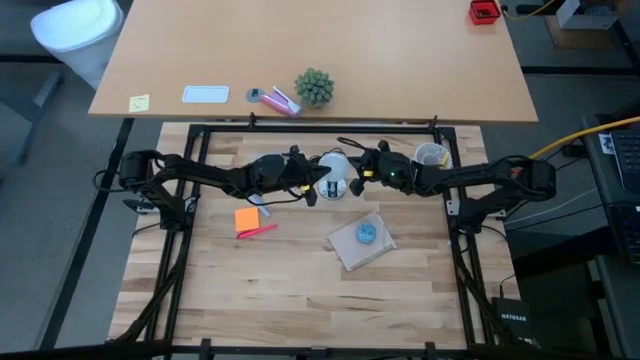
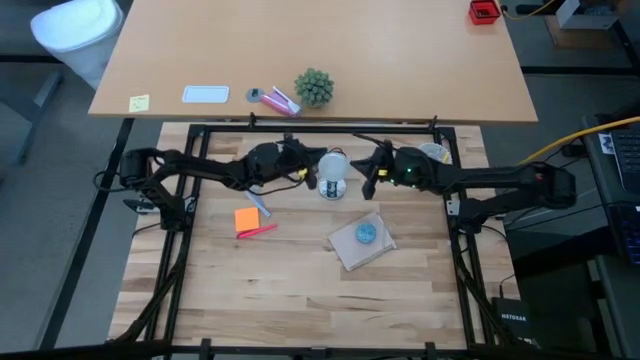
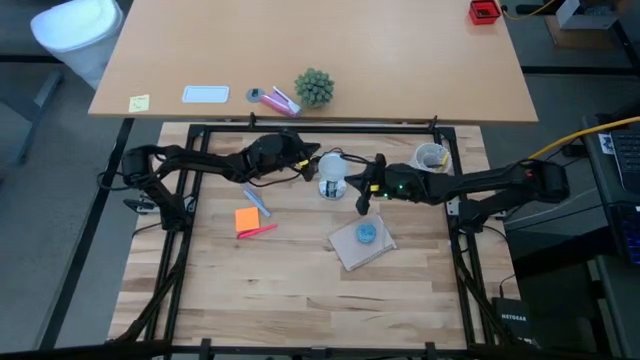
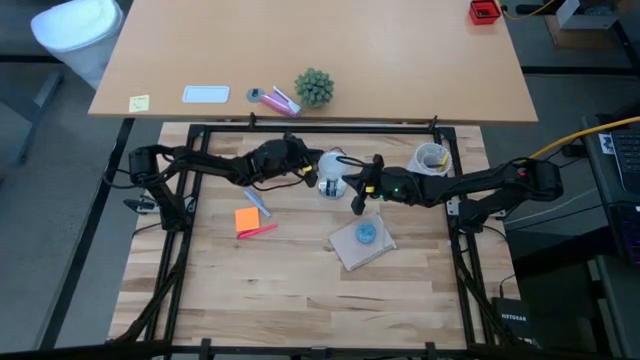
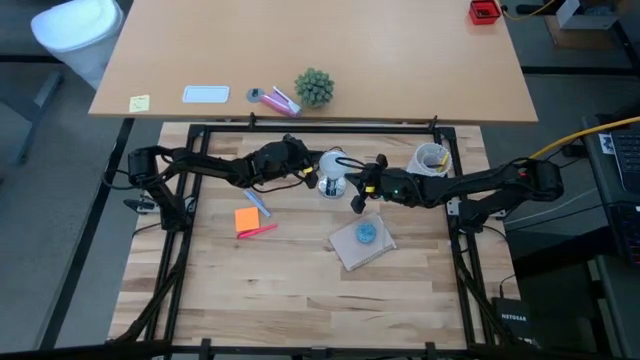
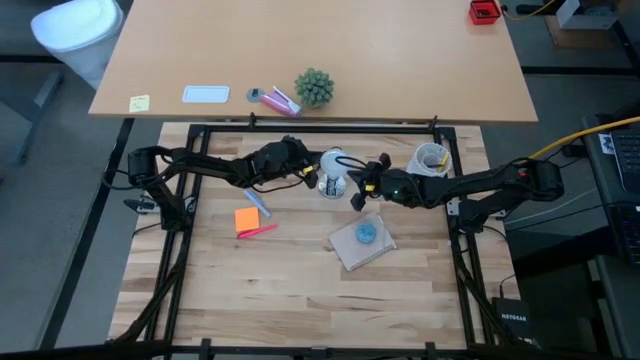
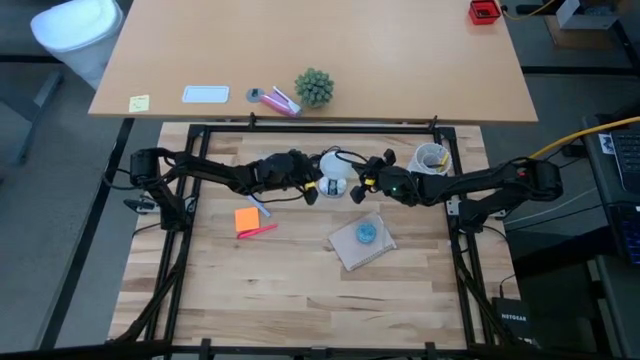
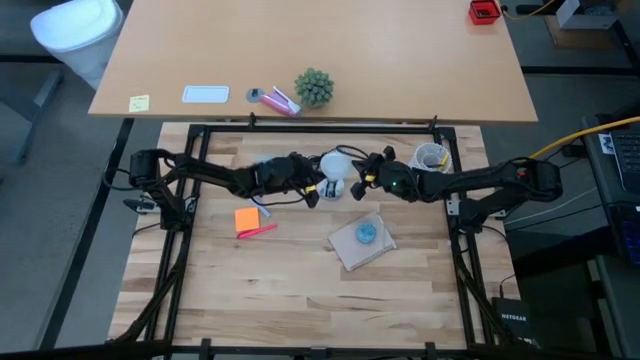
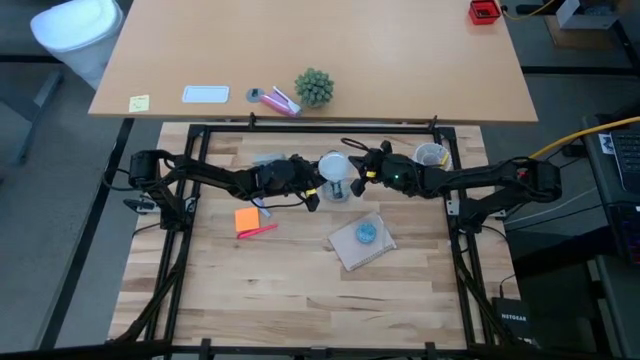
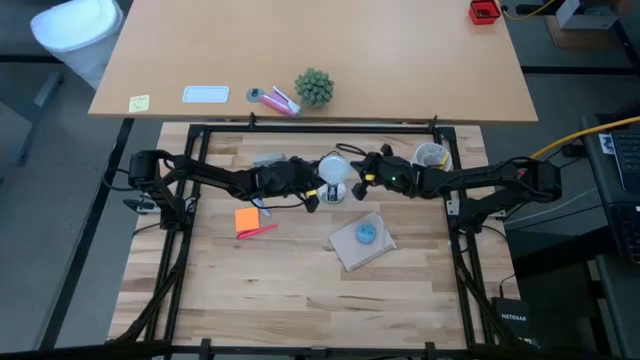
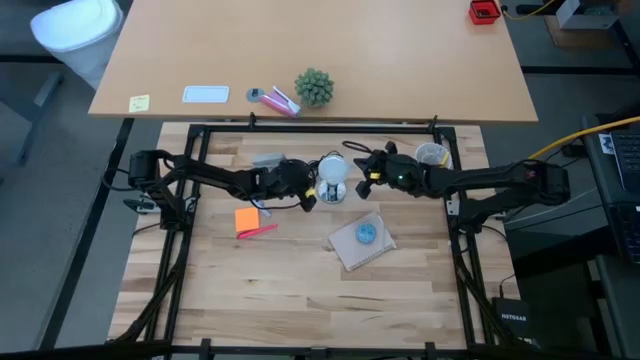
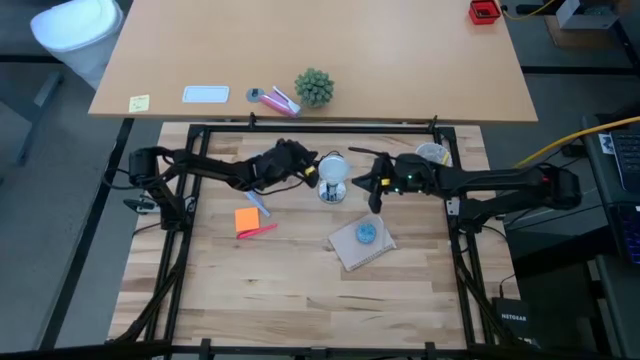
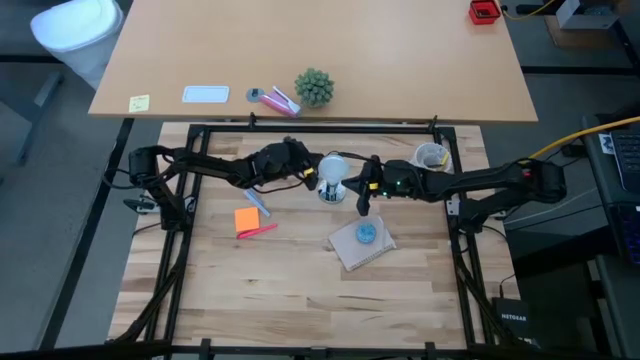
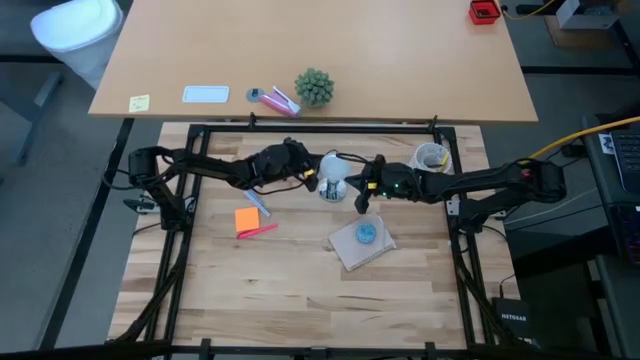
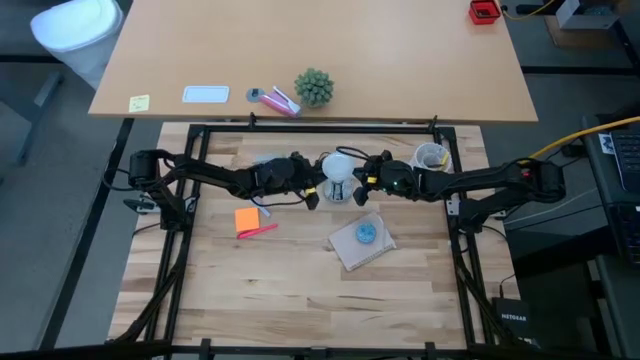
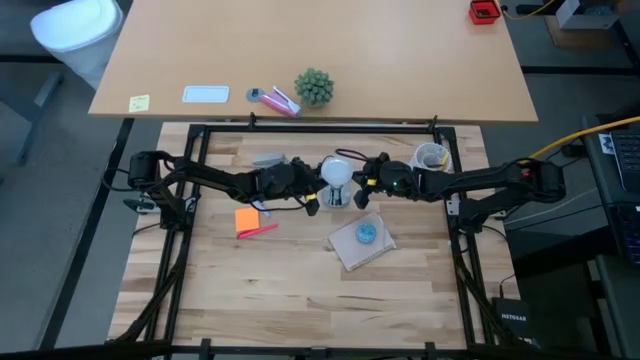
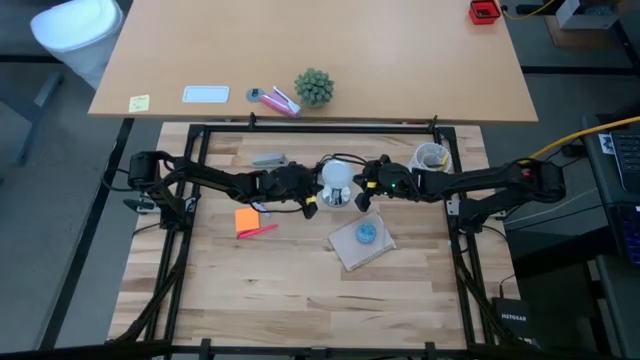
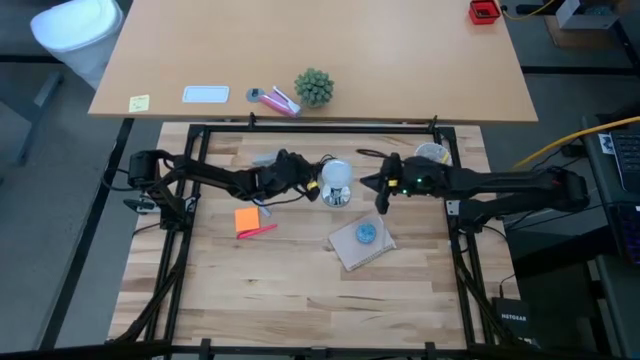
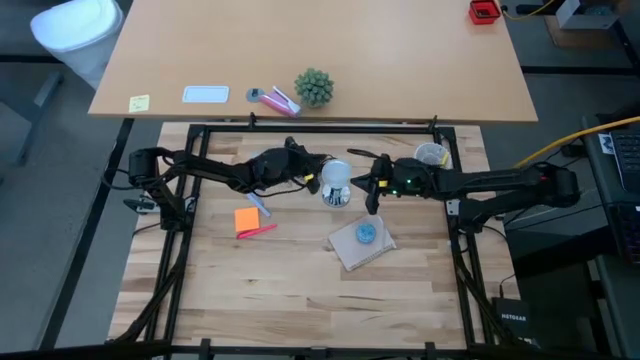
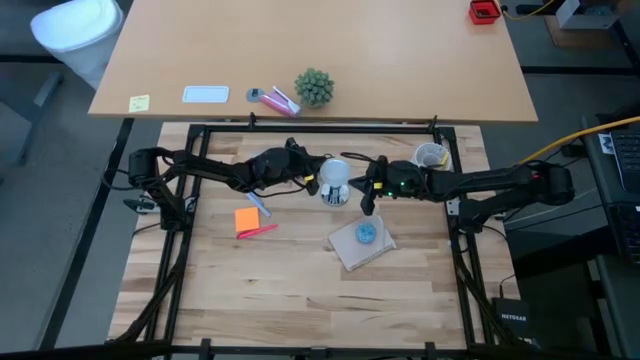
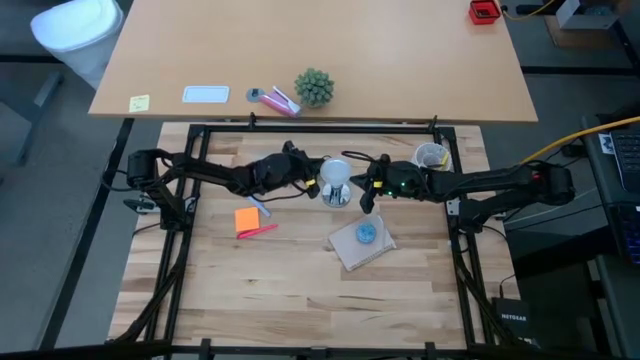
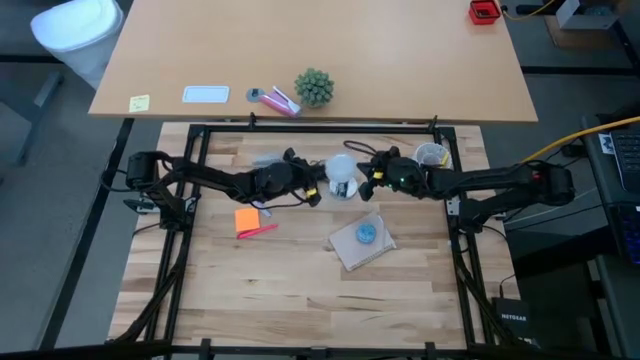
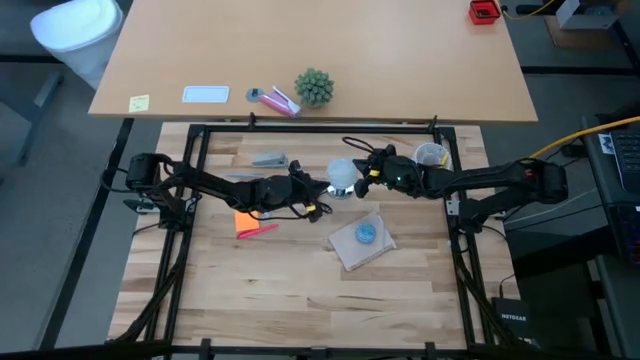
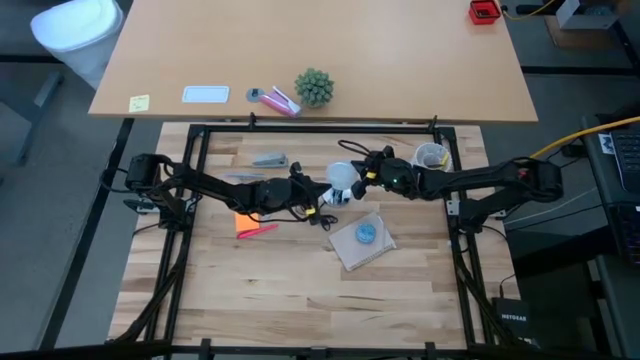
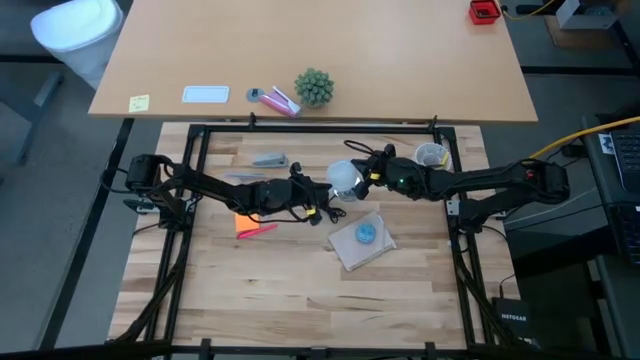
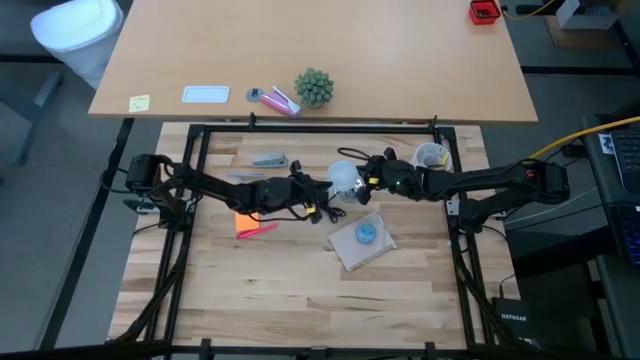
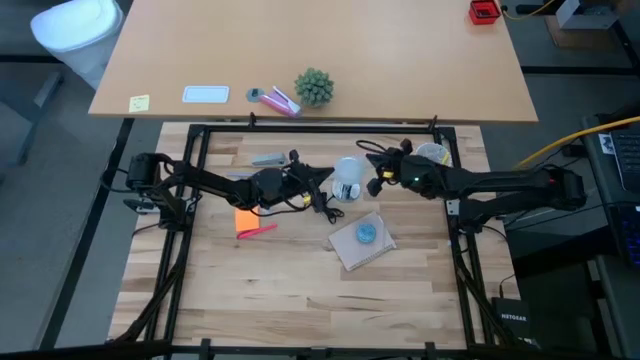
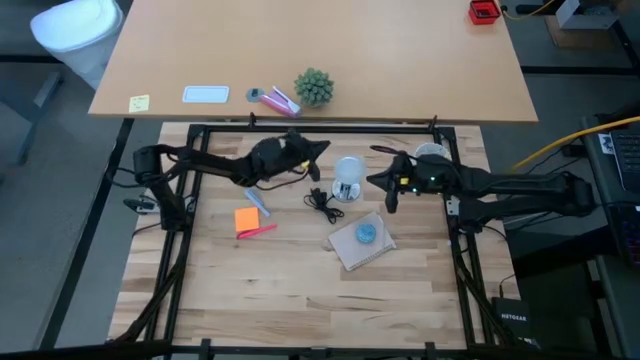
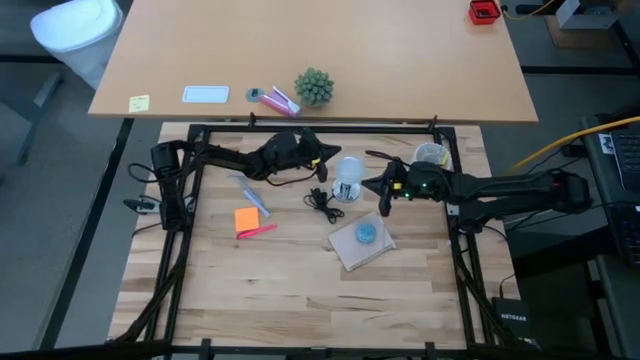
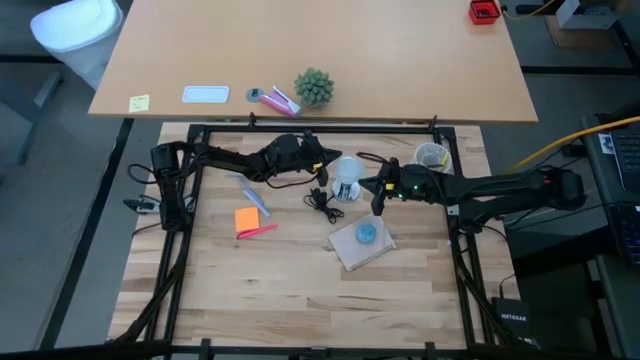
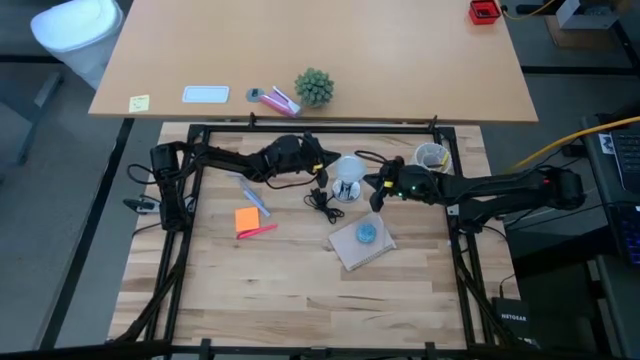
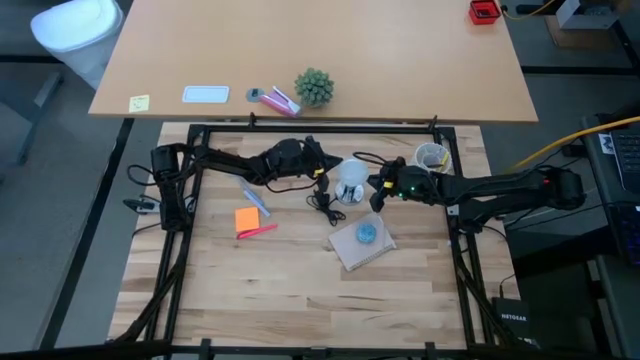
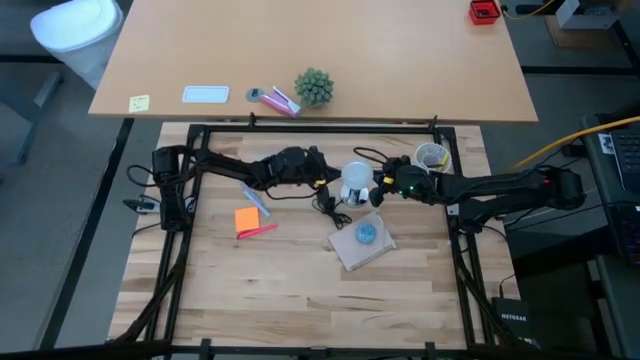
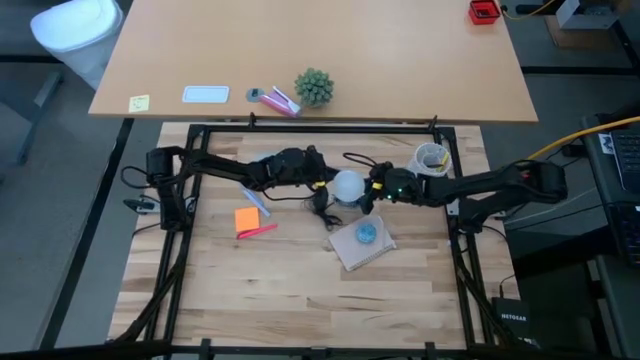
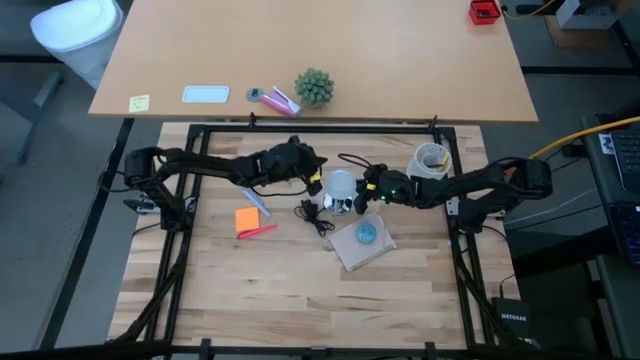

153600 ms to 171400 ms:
Task: Screw lightbulb
Remove the lightbulb from the lamp

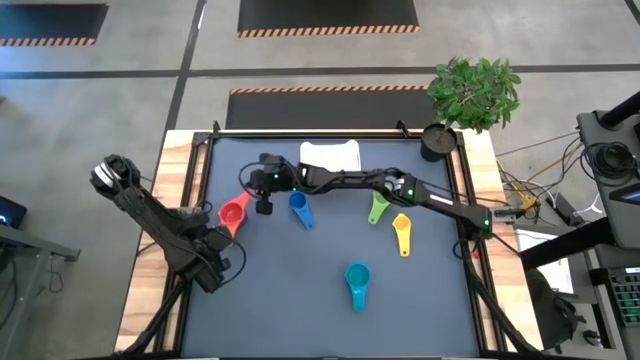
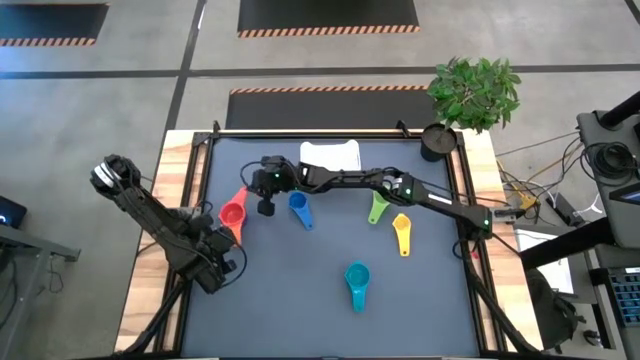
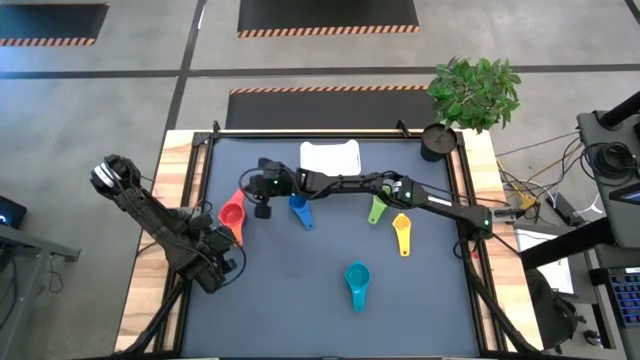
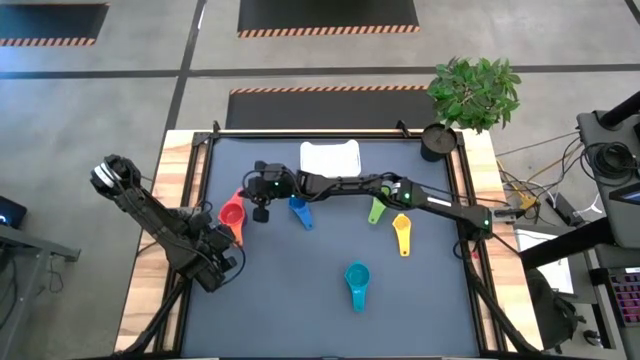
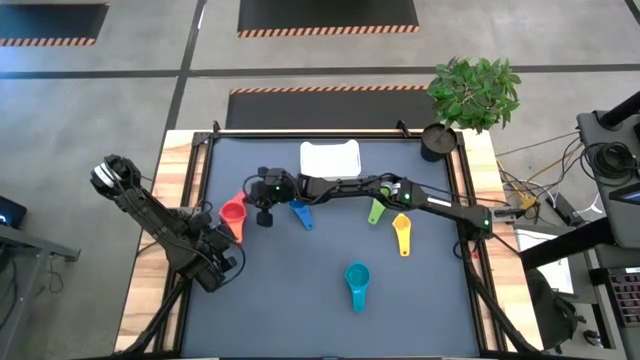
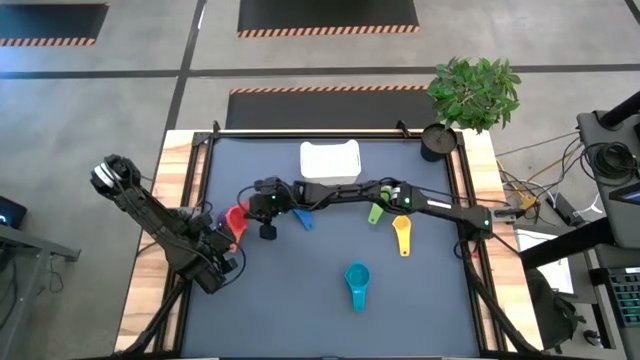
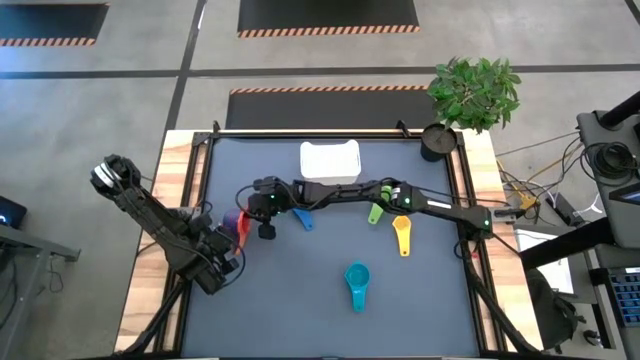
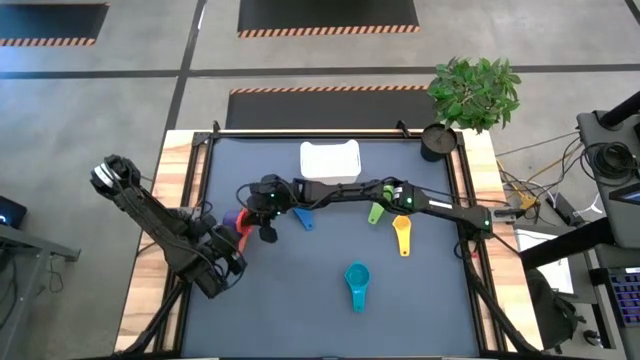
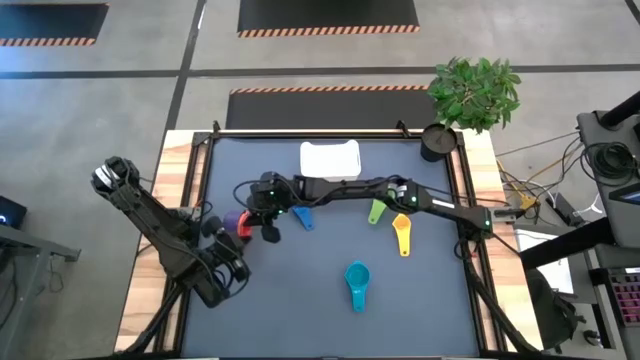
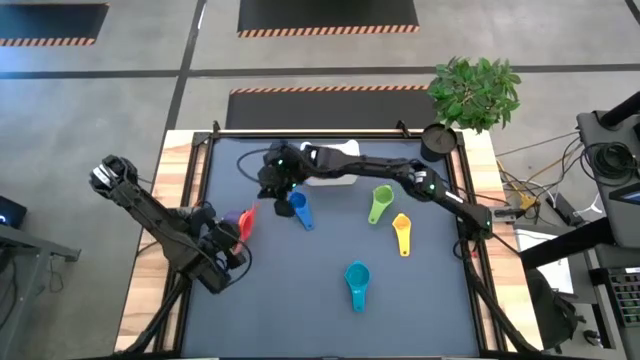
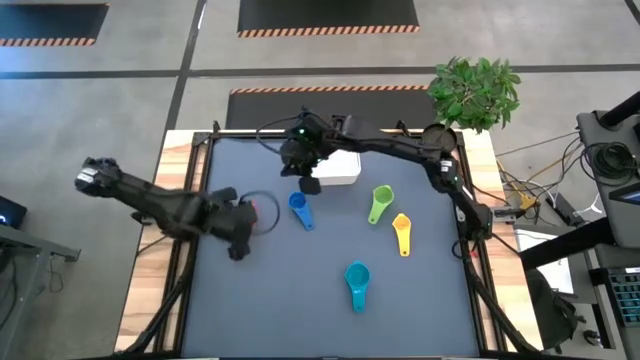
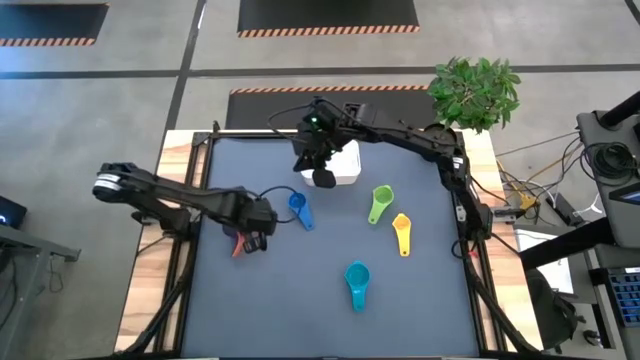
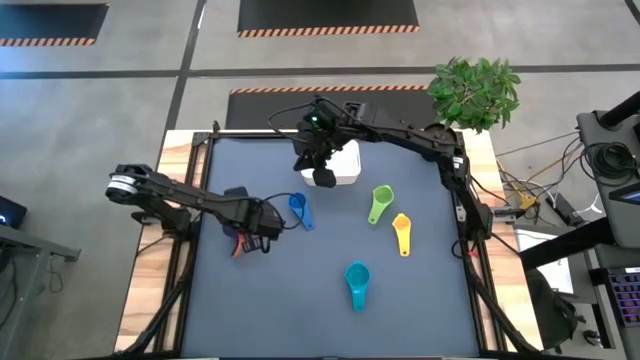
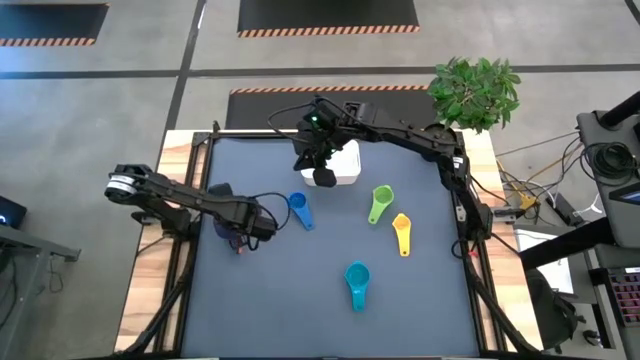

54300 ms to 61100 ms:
Task: Nest measuring cups in basket
Stack the red measuring cup on top of the orange measuring cup
